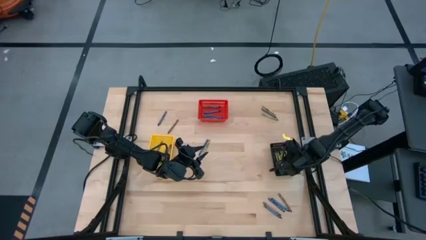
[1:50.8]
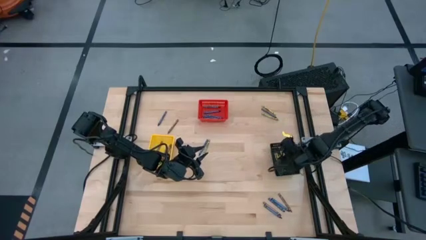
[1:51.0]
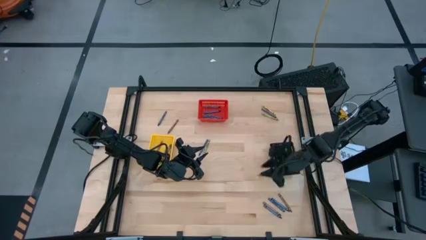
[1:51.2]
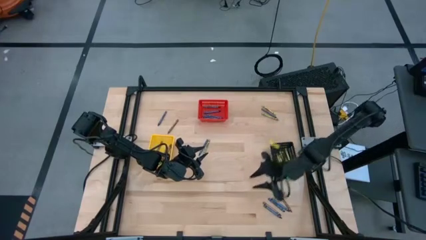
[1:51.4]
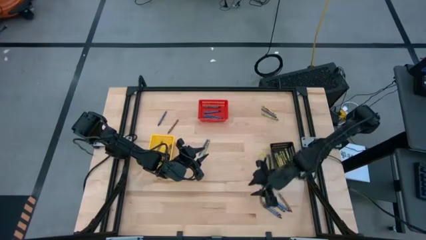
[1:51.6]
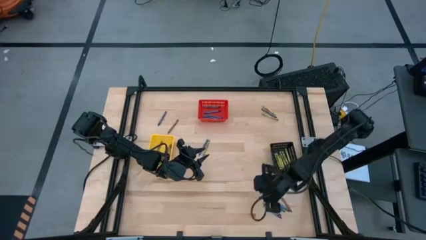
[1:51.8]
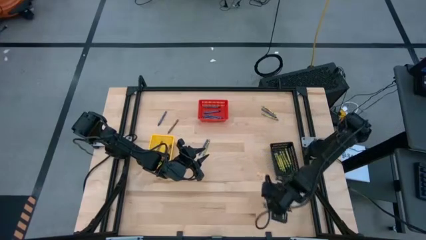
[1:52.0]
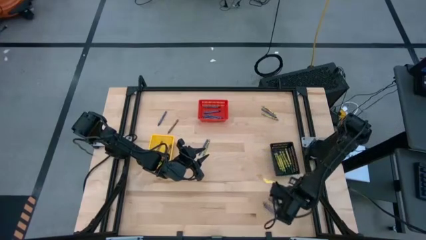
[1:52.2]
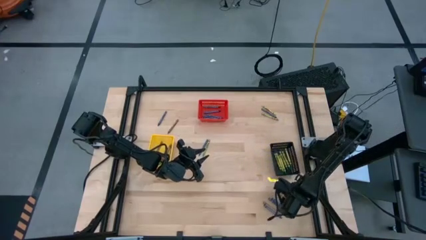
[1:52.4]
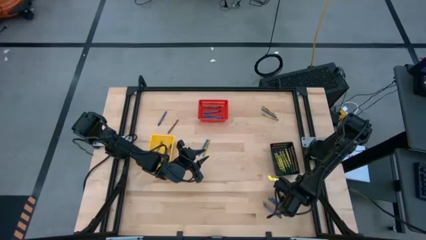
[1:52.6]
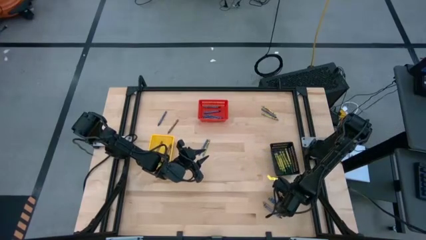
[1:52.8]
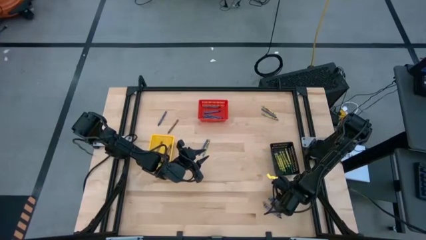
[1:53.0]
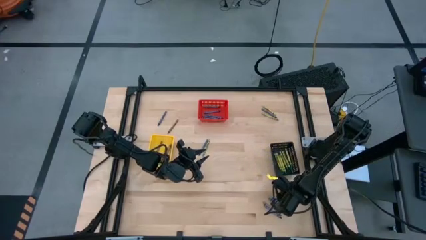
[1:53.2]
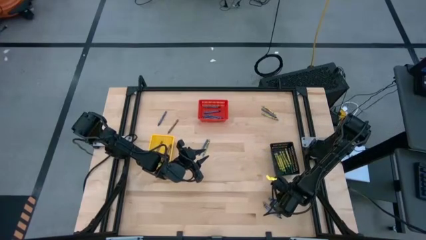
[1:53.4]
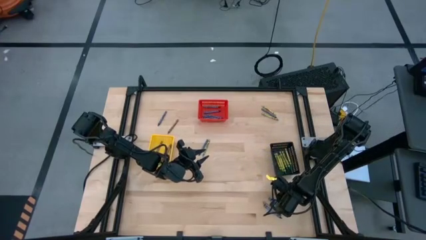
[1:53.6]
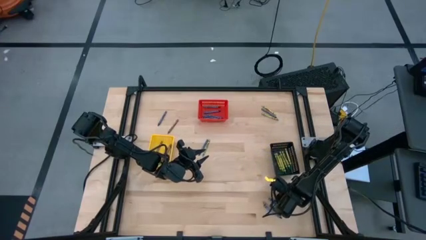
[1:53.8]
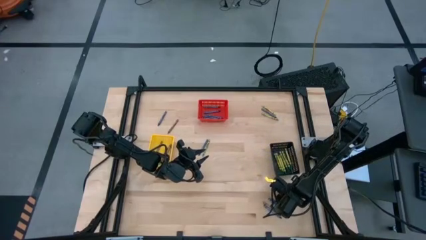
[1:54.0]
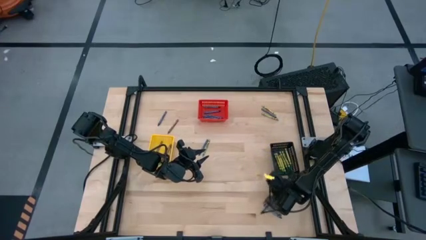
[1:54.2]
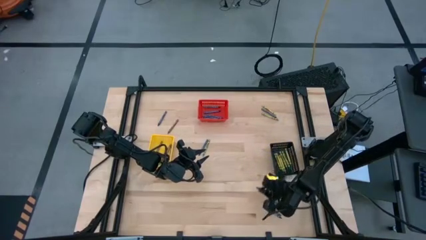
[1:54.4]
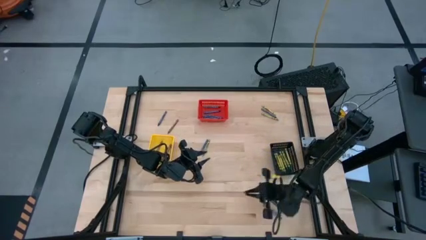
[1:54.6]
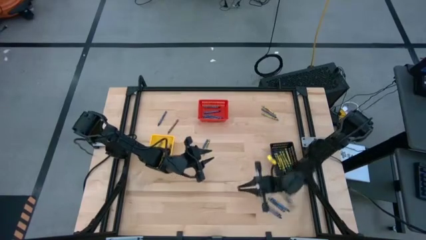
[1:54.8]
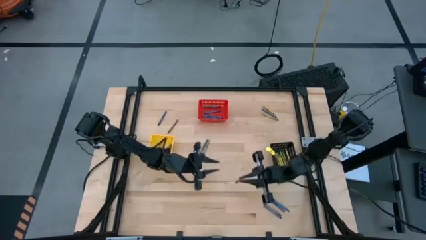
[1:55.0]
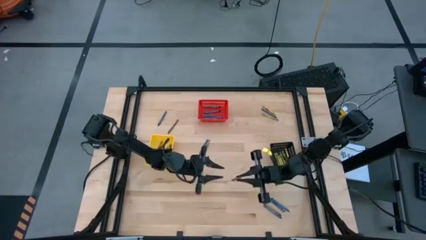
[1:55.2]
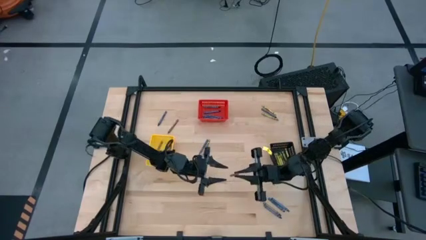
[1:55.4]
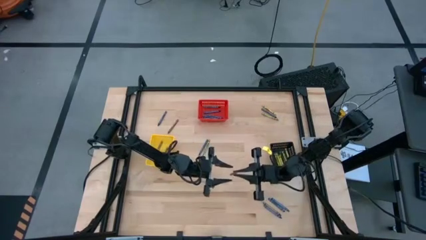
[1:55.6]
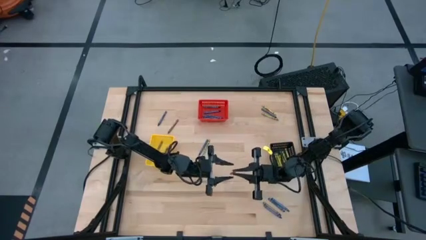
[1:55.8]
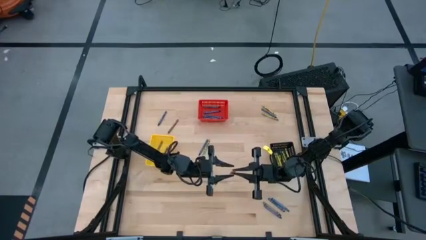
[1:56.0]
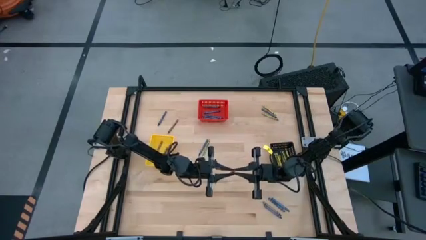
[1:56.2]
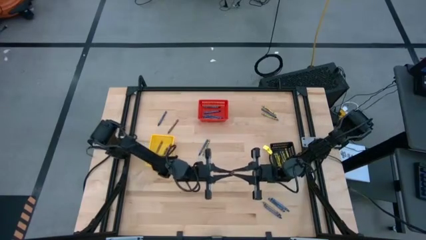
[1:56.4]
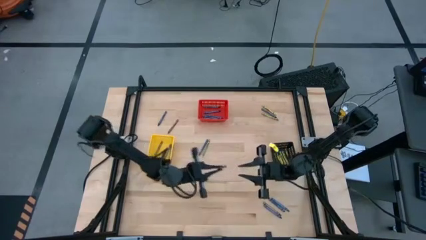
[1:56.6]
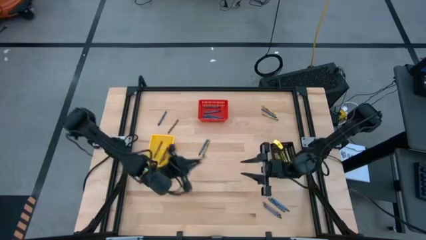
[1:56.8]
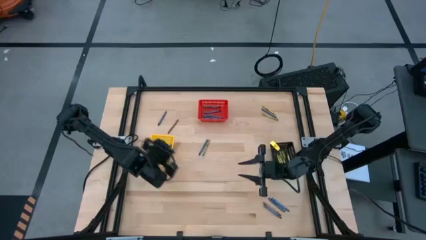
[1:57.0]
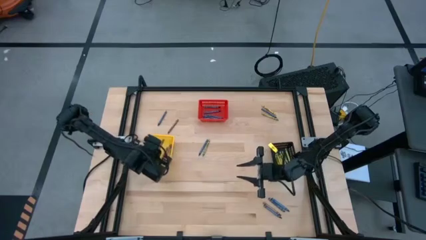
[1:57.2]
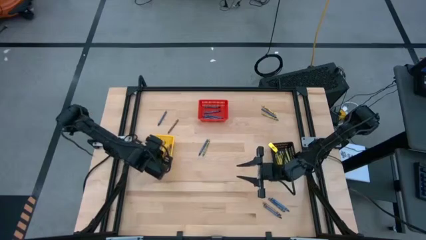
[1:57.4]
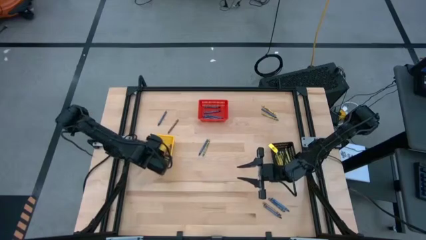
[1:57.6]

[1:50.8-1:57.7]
Task: Sort crayons
Put the brown crayon into the yellow basket

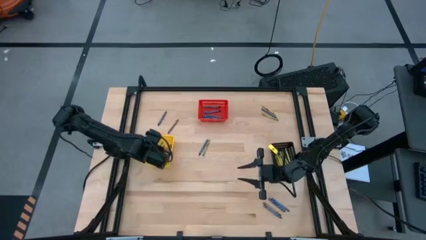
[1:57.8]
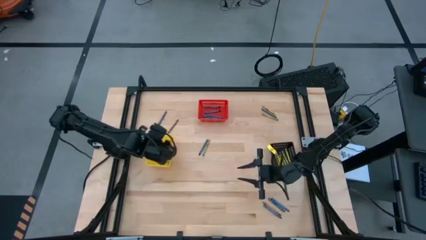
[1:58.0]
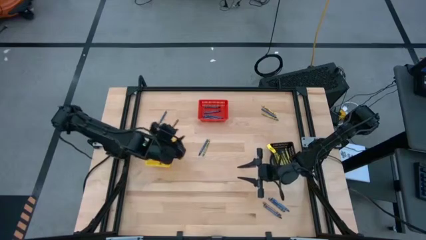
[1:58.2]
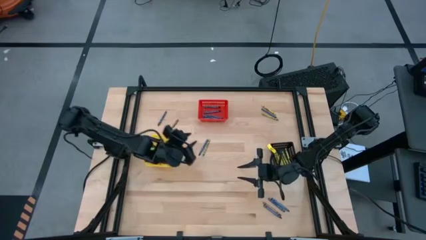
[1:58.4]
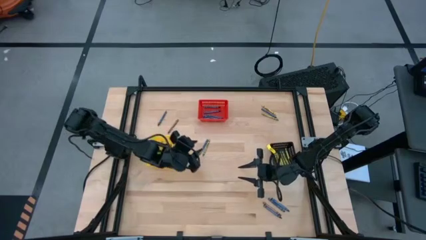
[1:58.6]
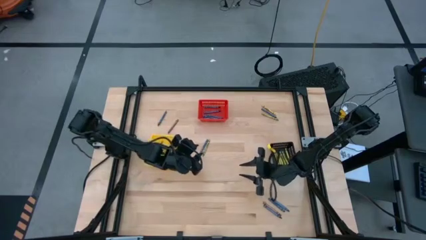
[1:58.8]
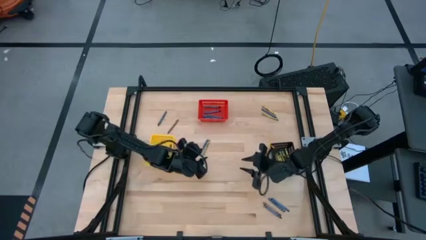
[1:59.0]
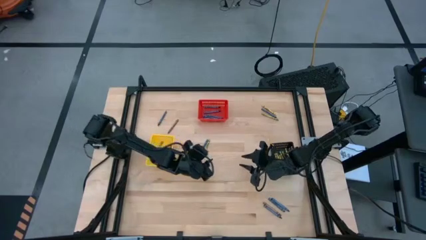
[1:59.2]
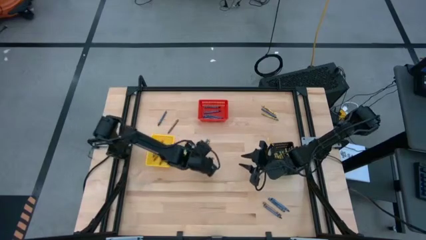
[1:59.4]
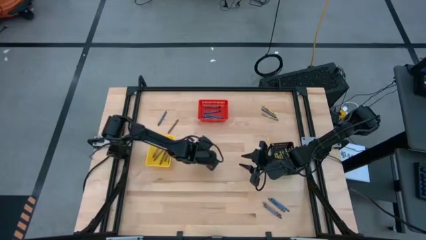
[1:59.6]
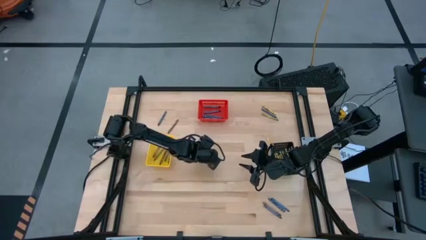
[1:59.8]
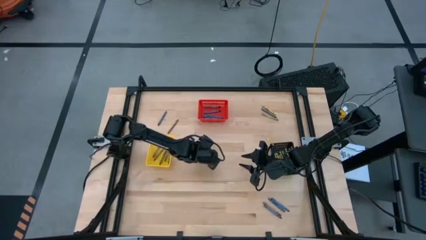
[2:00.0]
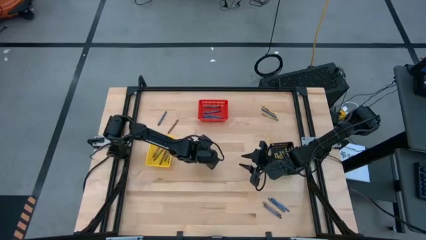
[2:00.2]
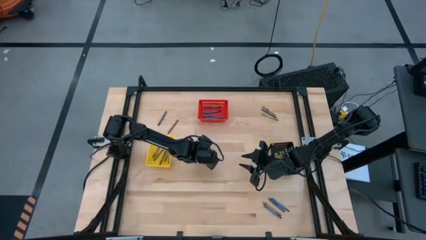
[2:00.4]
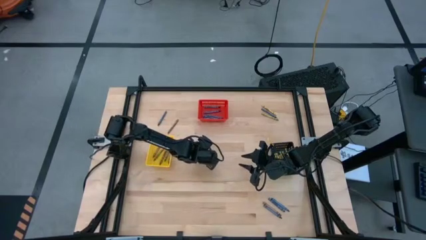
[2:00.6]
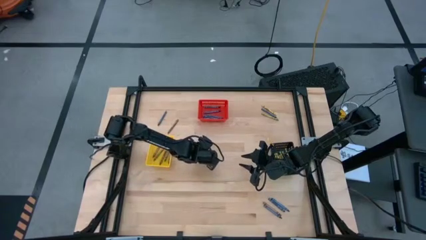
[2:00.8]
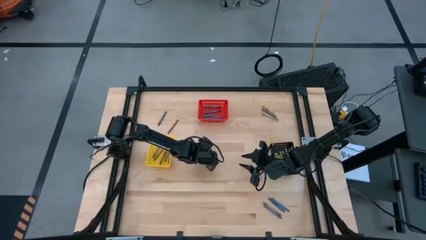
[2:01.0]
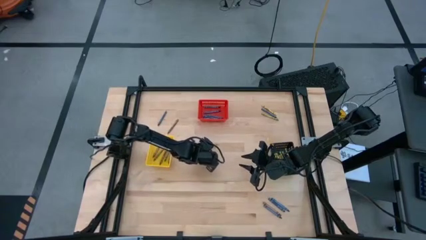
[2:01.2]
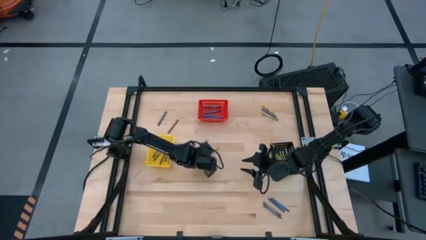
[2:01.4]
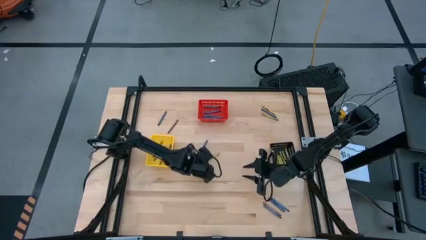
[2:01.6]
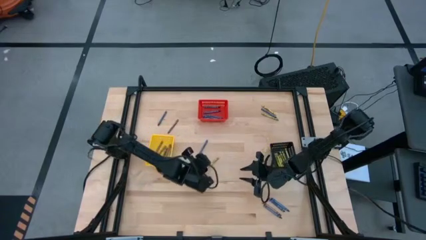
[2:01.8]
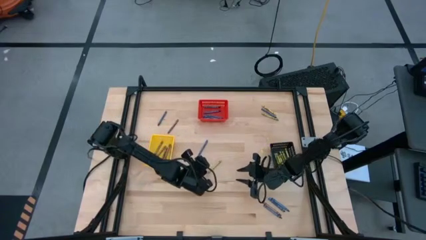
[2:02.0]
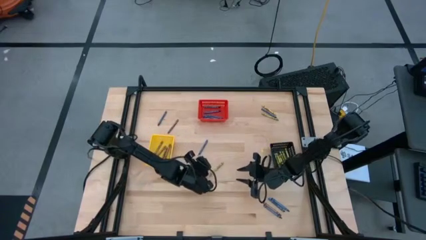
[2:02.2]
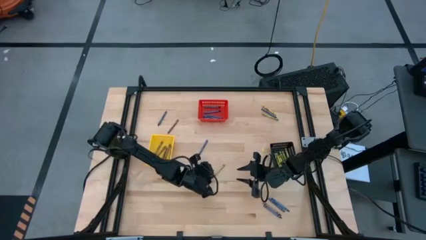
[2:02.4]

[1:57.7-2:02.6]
Put the green crayon into the black basket

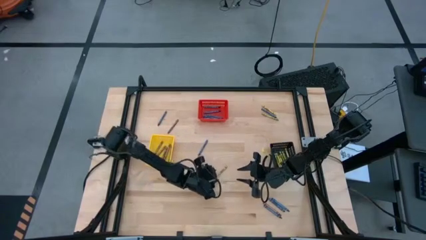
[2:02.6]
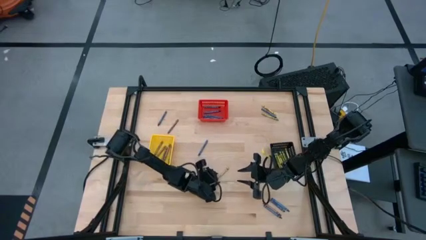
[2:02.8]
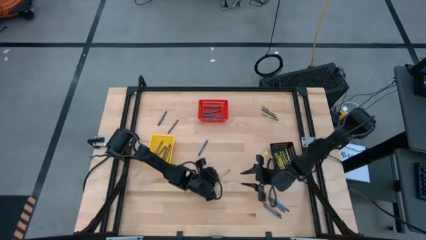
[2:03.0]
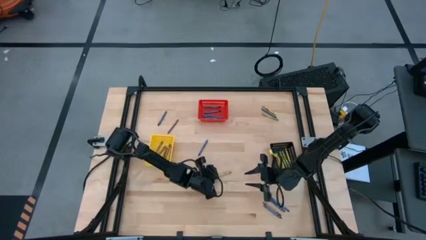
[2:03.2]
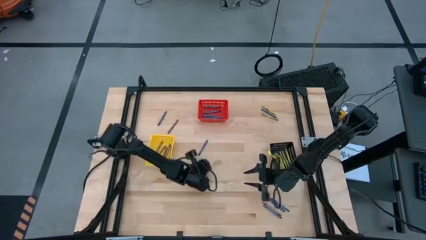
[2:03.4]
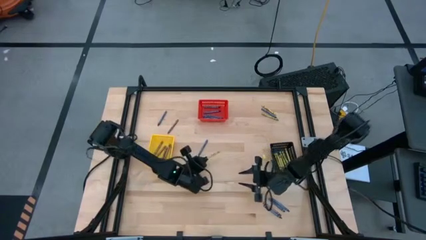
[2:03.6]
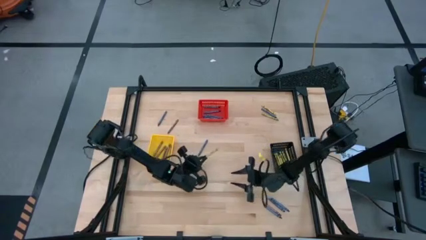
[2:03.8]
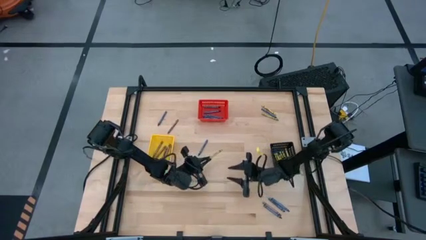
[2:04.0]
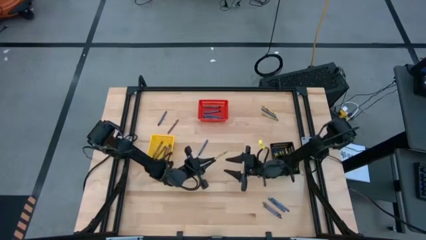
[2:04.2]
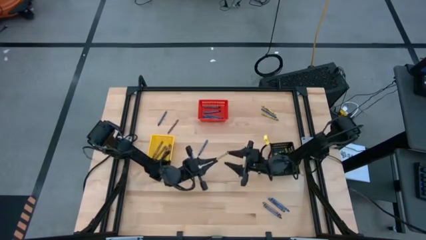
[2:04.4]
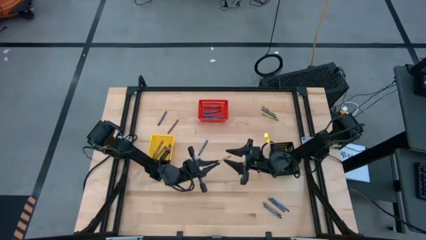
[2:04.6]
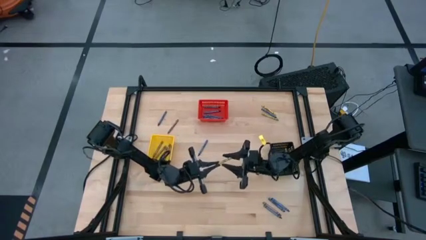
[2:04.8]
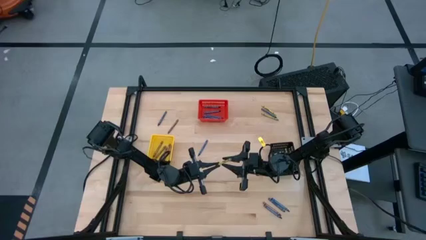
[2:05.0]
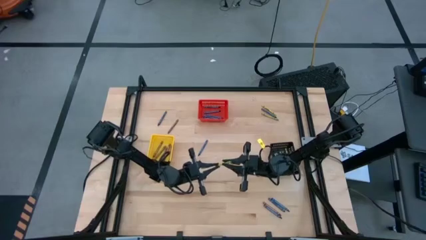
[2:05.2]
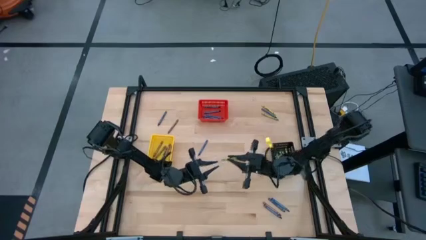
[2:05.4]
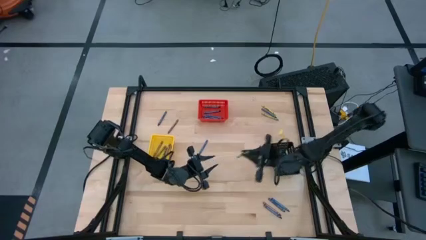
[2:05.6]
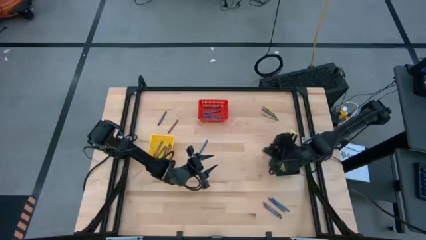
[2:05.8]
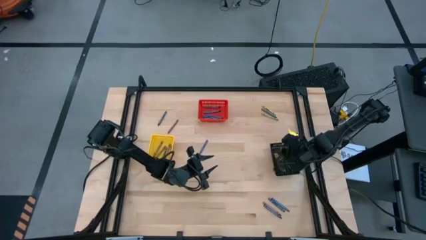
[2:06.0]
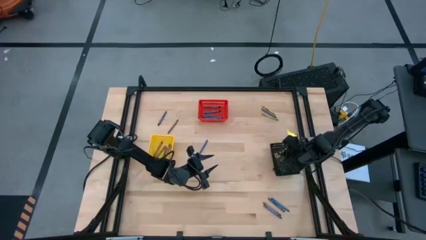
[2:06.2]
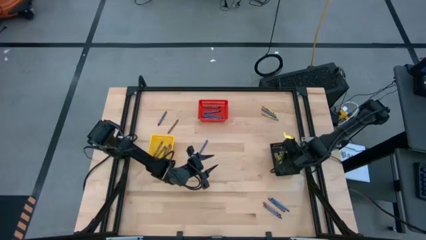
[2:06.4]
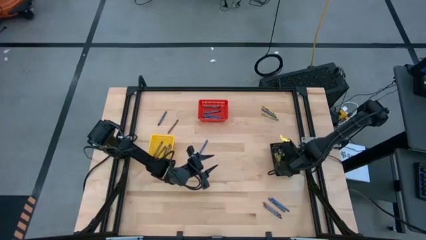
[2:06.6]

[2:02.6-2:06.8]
Put the green crayon into the black basket
